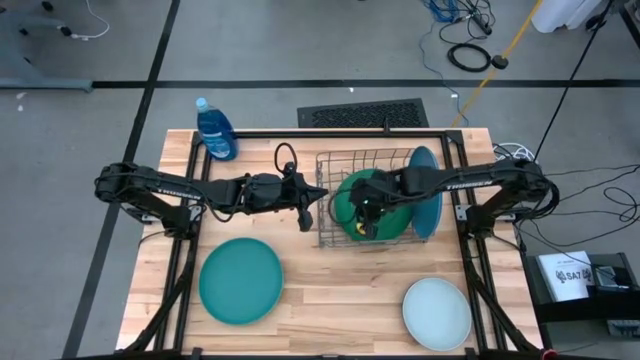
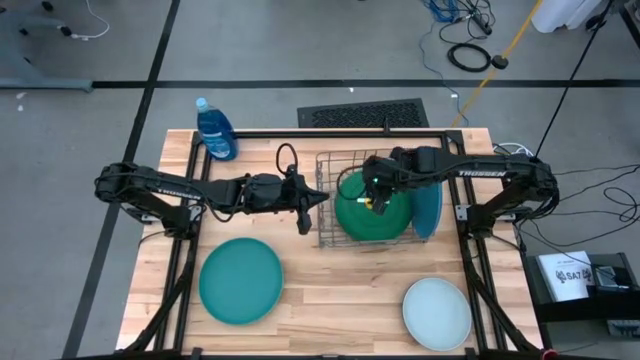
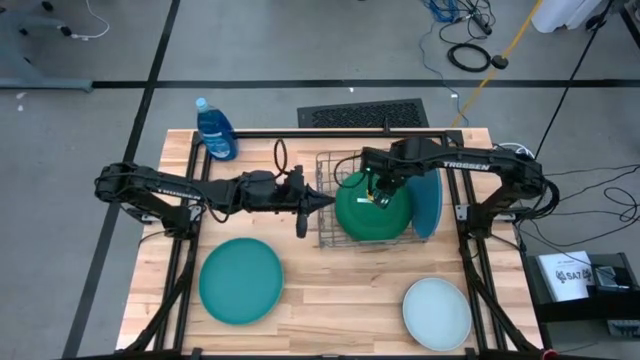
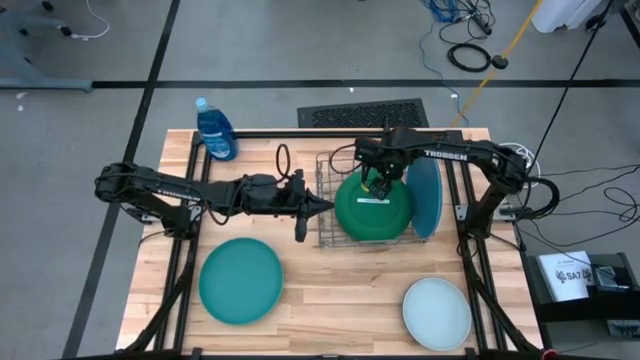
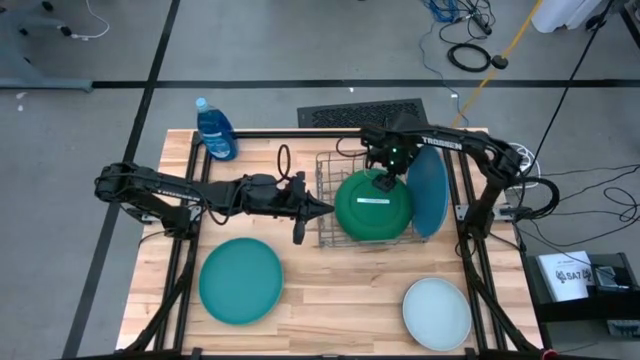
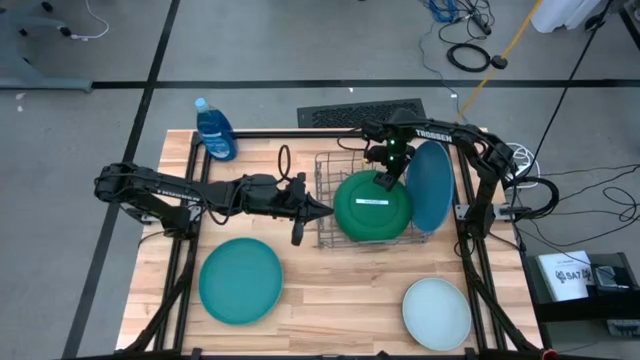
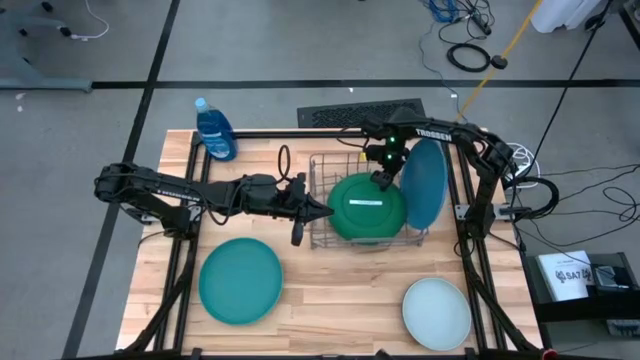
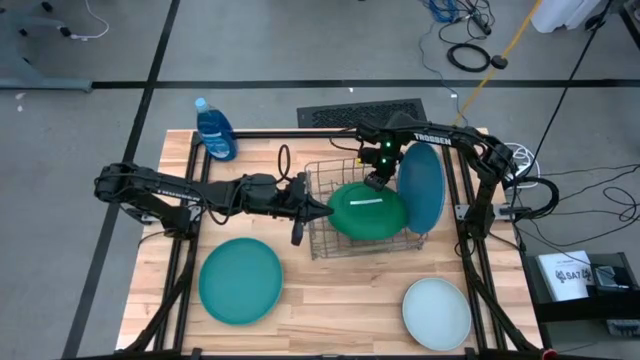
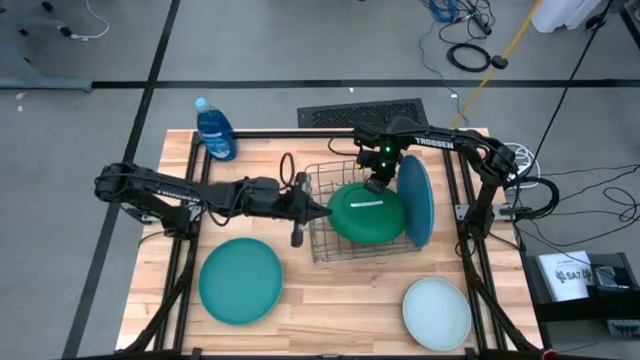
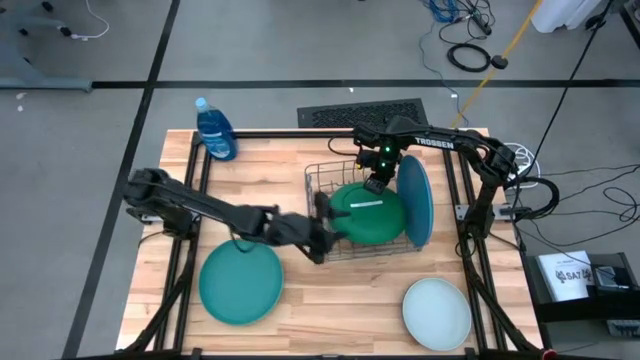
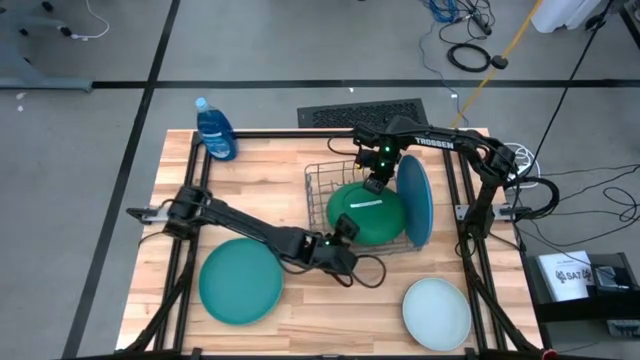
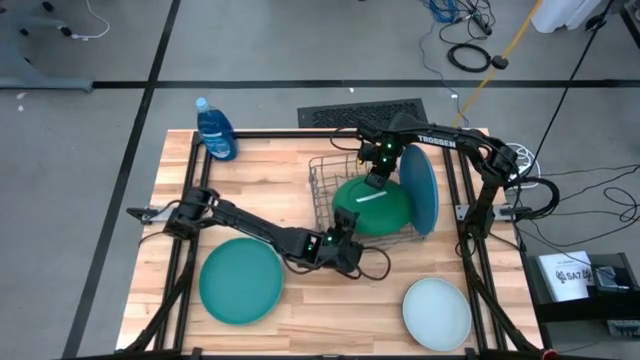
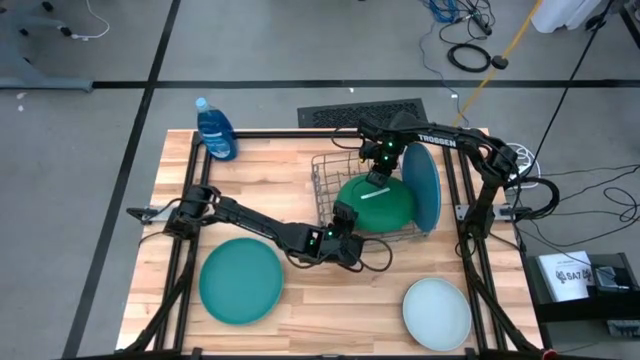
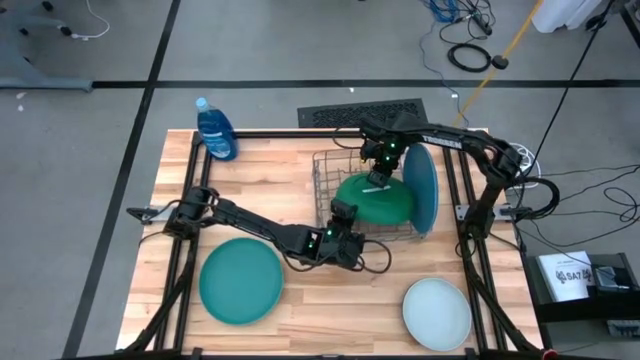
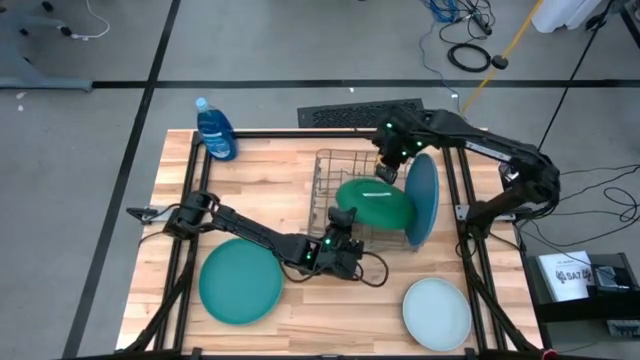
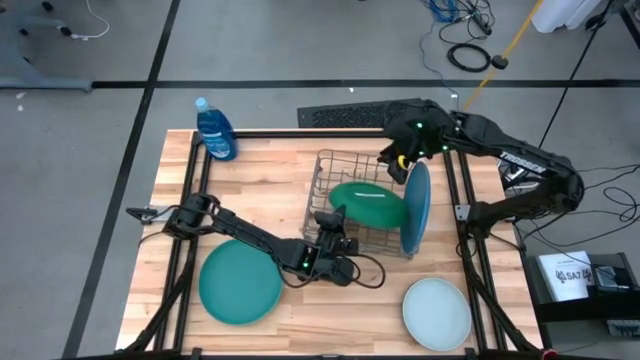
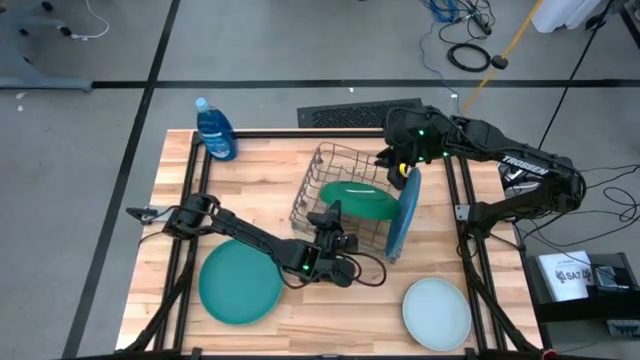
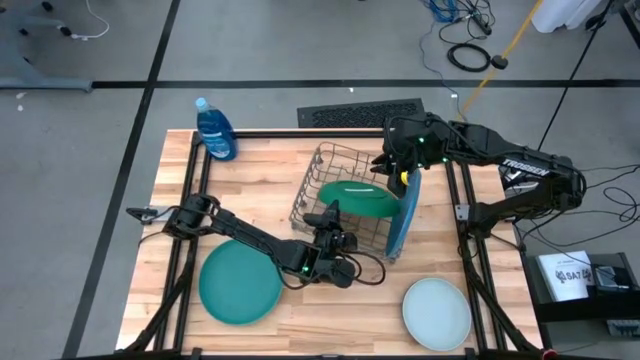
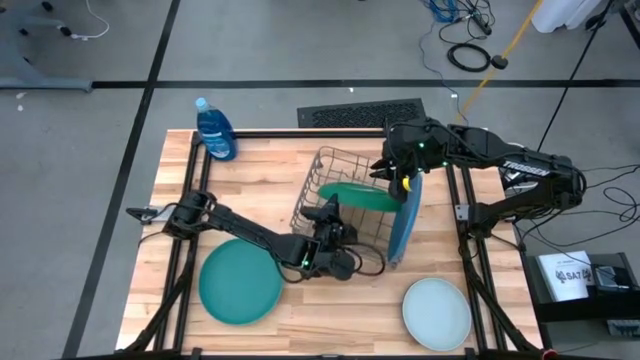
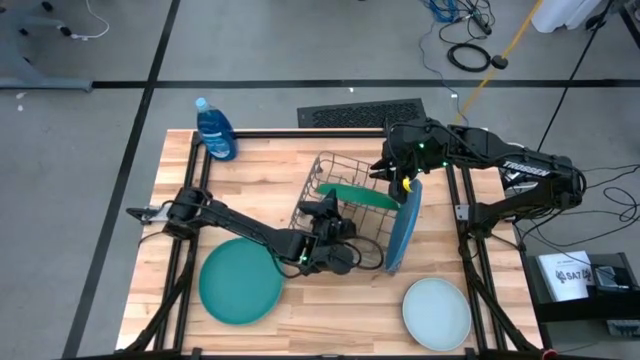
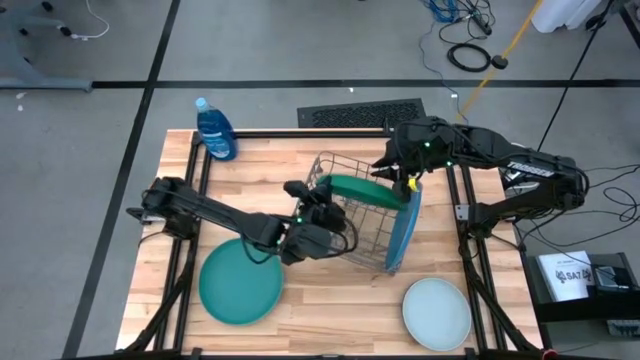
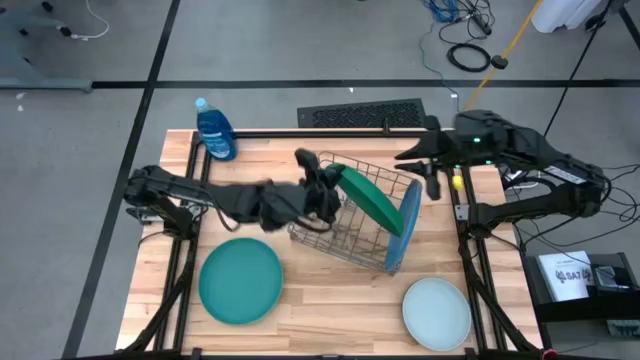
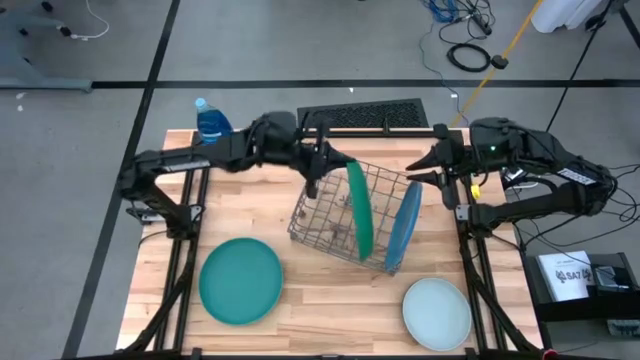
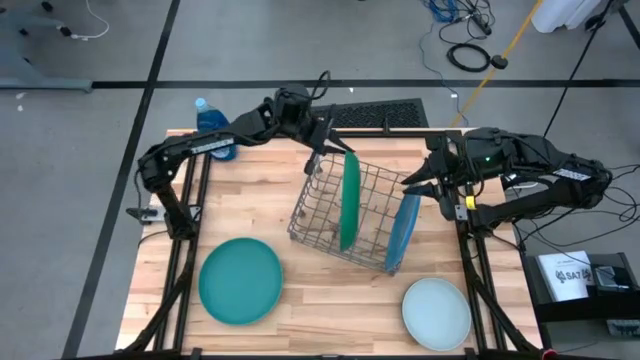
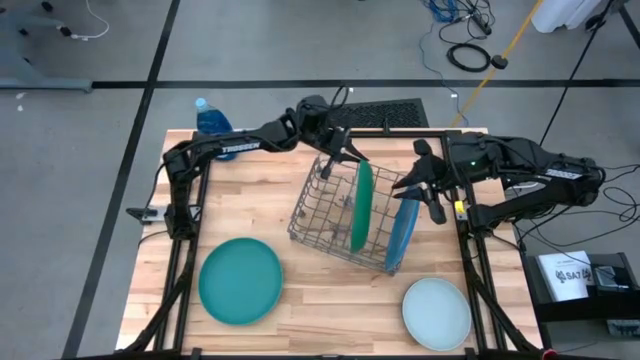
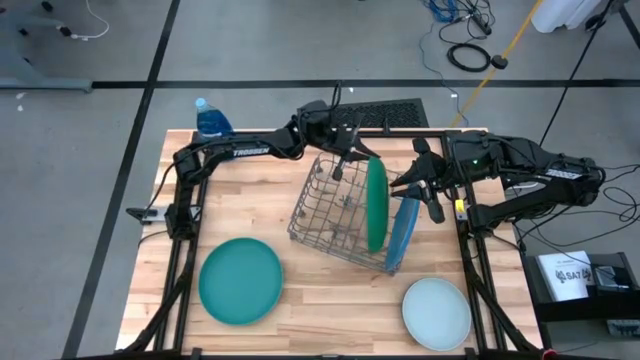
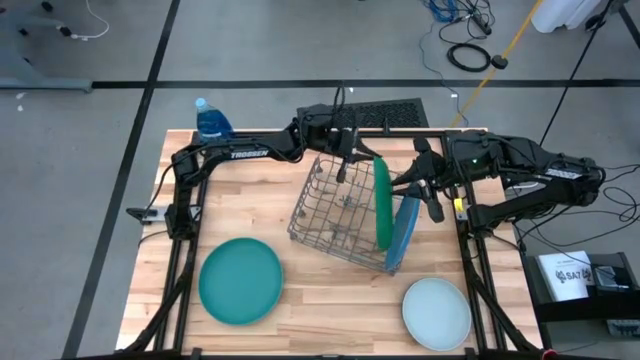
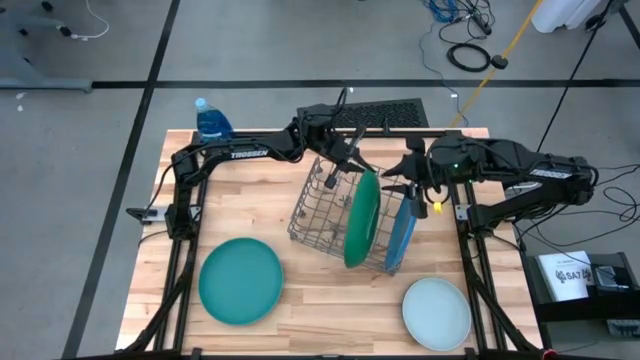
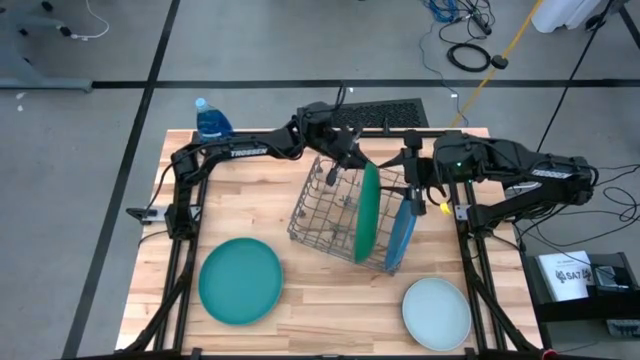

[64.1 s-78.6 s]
Task: Sort dishes
Put the dark green plate into the dish rack
